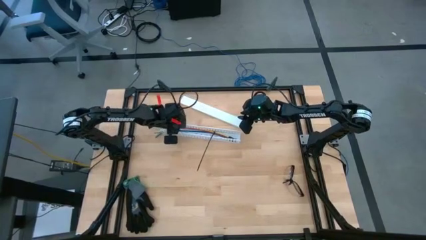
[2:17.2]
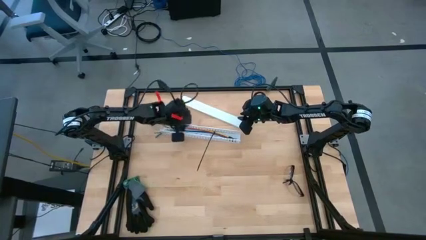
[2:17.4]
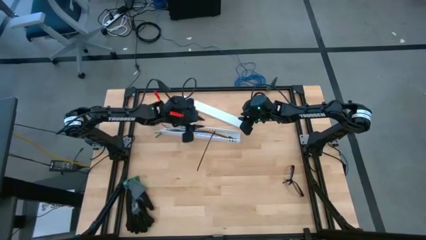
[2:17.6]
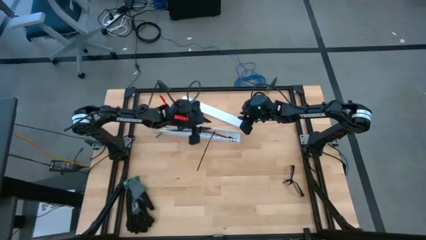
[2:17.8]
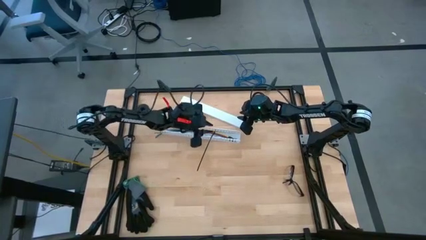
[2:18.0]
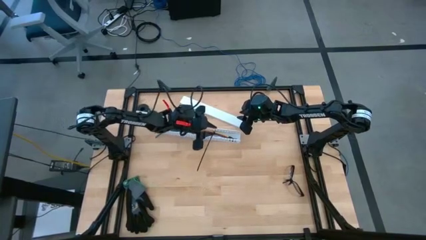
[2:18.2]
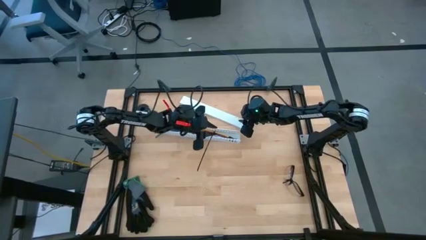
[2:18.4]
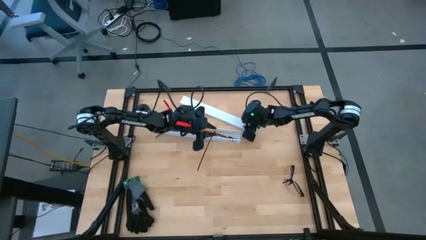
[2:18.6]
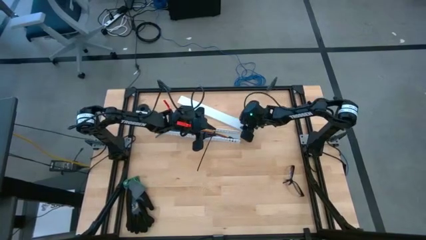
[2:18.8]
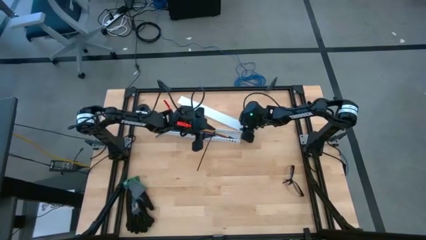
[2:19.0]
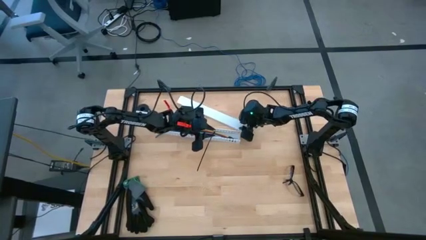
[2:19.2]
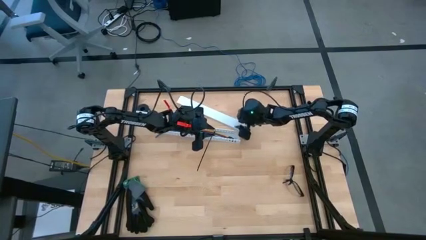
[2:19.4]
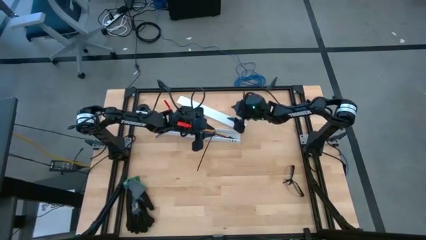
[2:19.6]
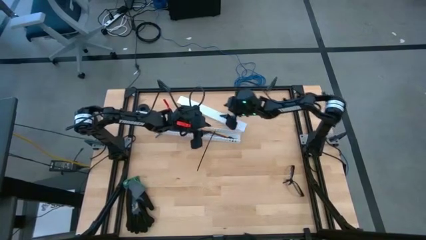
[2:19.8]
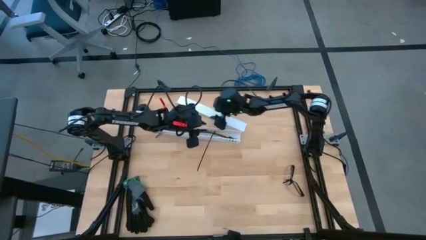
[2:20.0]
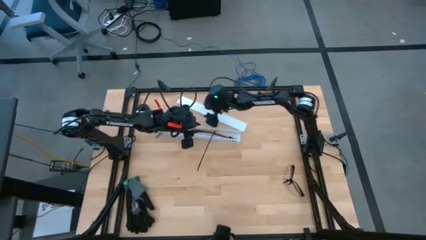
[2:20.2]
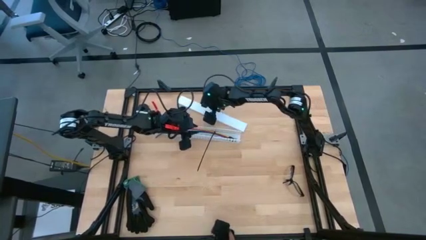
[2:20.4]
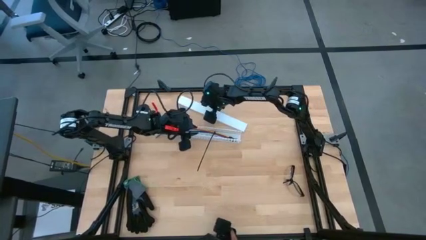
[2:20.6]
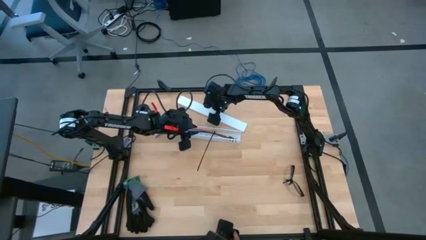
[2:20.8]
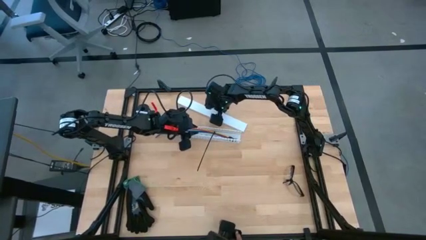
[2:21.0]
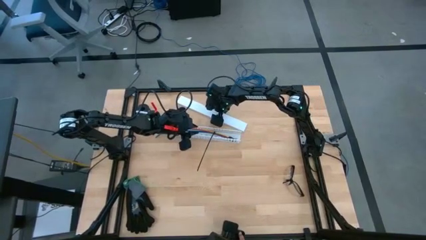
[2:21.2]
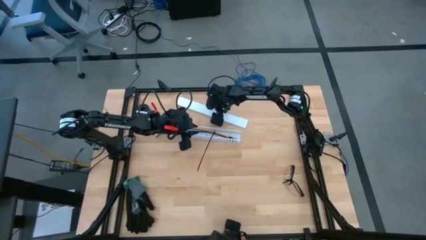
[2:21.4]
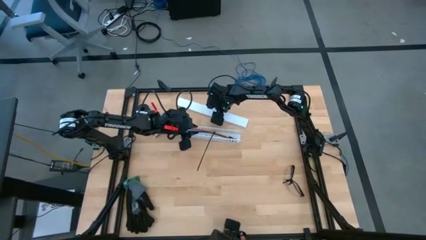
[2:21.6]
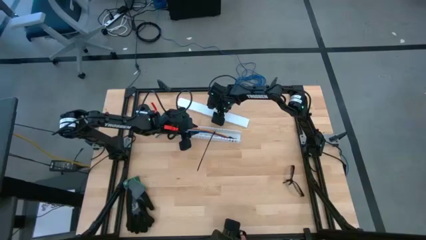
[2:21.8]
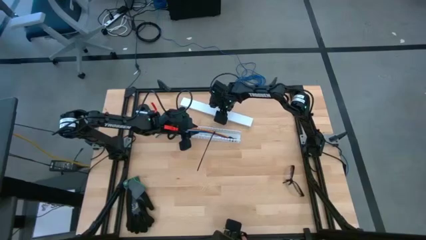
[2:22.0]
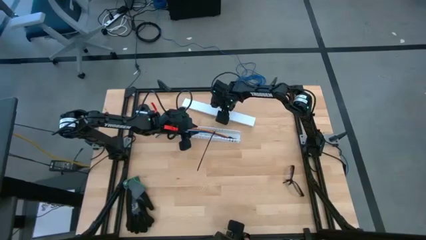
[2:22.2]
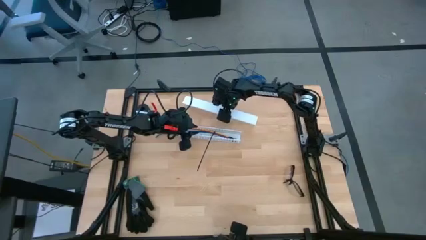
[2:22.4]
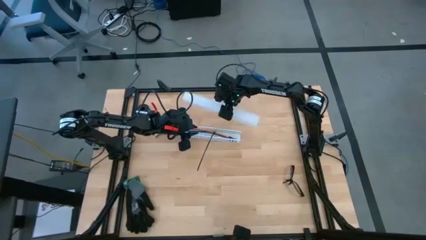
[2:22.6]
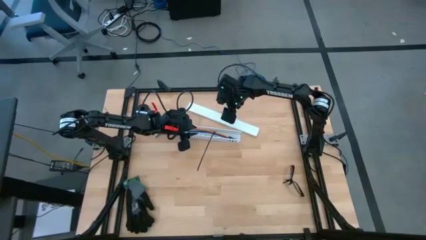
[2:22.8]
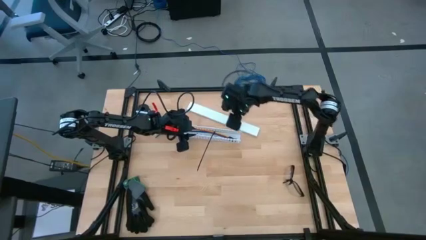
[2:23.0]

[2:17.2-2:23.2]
Task: Ziptie cables
Close the white cable duct

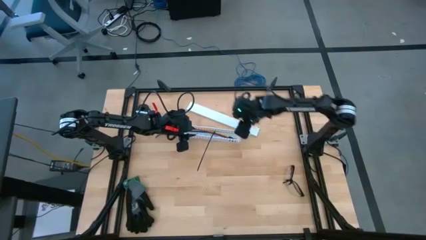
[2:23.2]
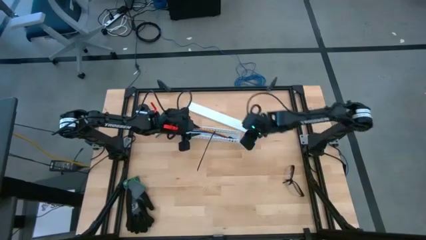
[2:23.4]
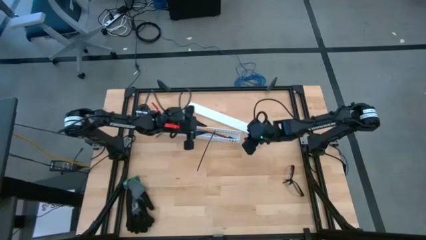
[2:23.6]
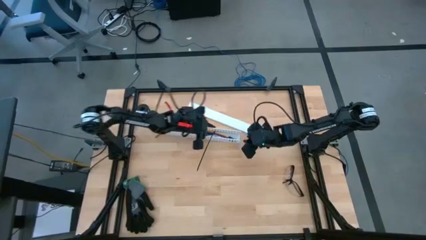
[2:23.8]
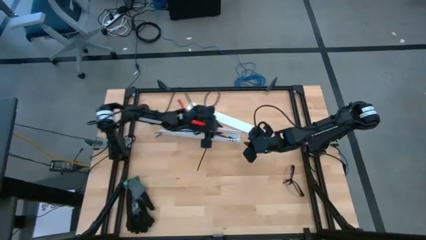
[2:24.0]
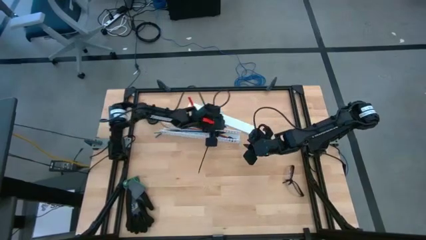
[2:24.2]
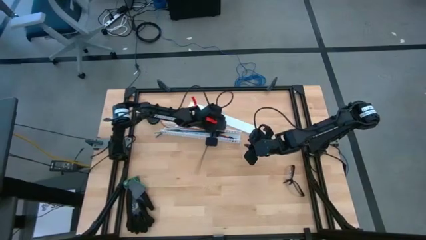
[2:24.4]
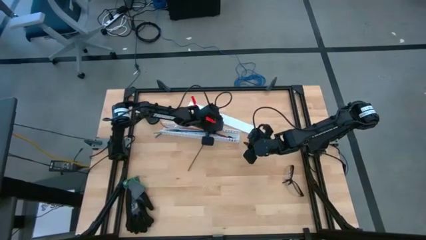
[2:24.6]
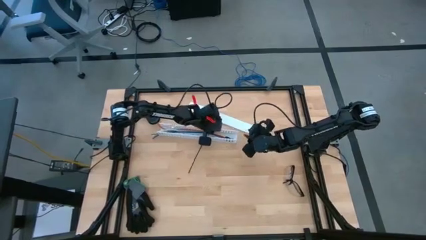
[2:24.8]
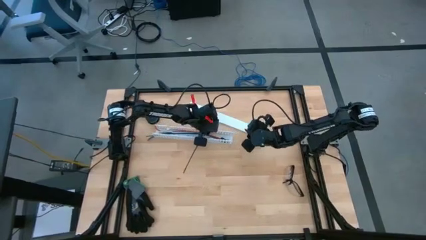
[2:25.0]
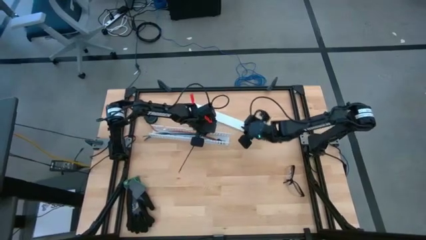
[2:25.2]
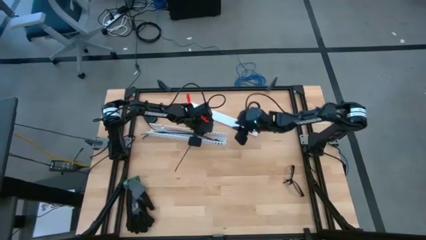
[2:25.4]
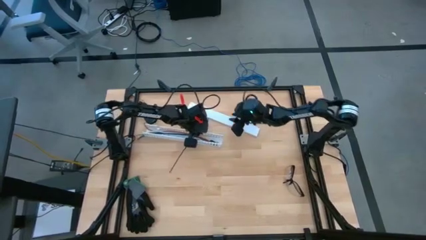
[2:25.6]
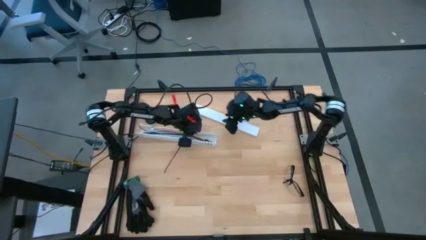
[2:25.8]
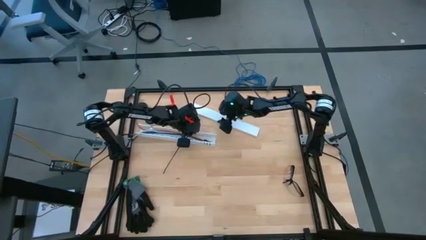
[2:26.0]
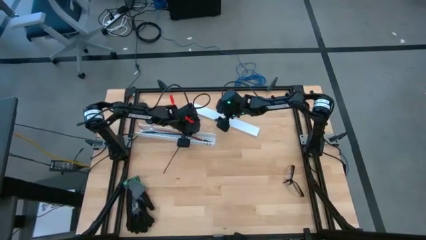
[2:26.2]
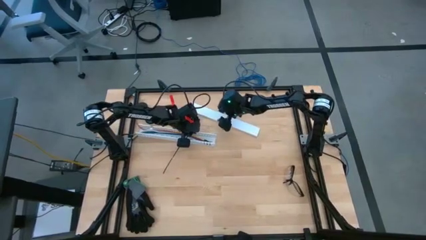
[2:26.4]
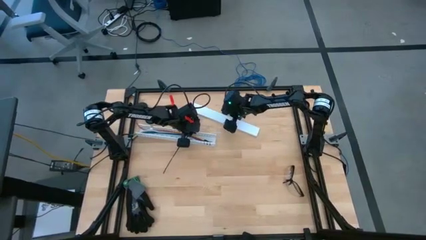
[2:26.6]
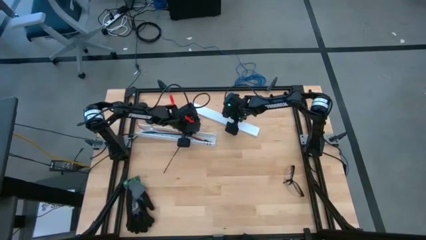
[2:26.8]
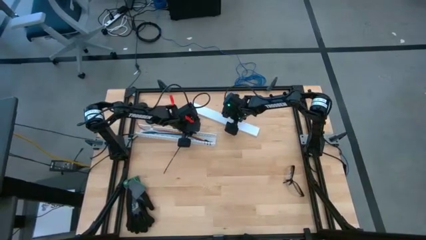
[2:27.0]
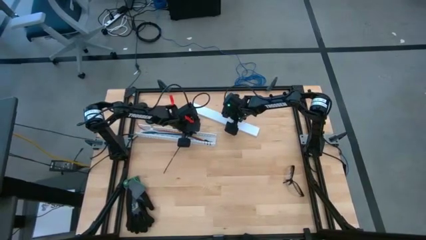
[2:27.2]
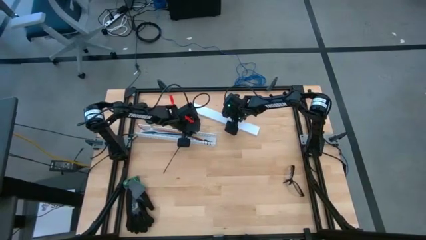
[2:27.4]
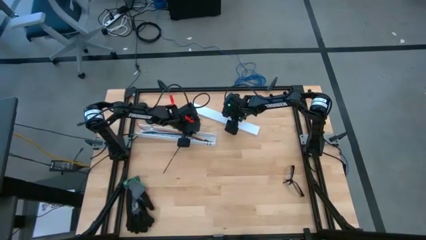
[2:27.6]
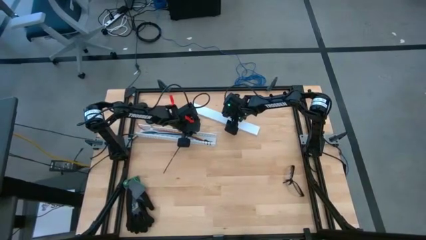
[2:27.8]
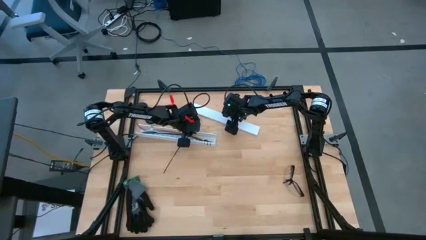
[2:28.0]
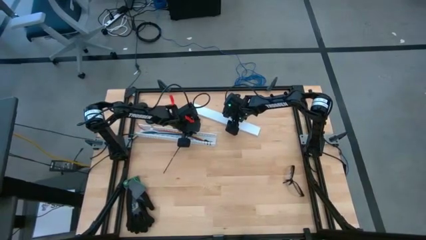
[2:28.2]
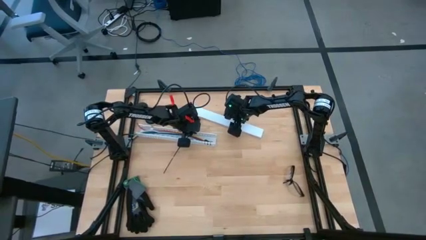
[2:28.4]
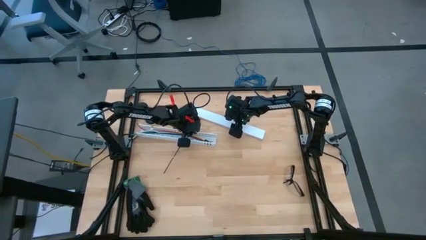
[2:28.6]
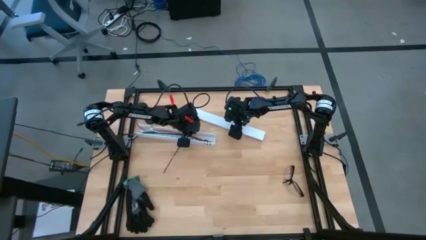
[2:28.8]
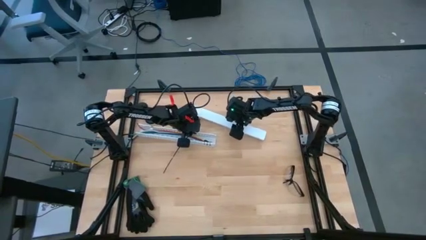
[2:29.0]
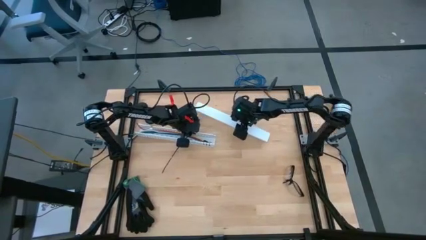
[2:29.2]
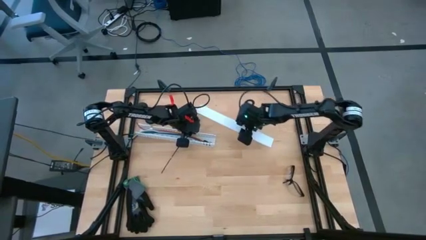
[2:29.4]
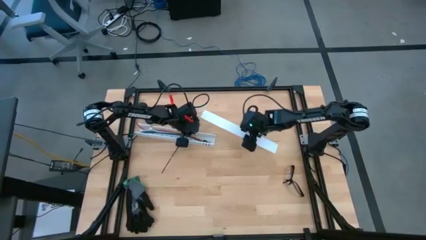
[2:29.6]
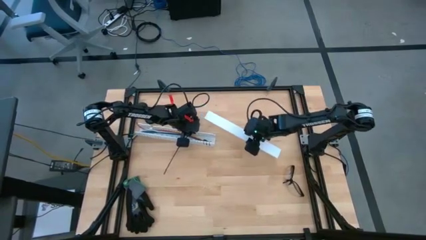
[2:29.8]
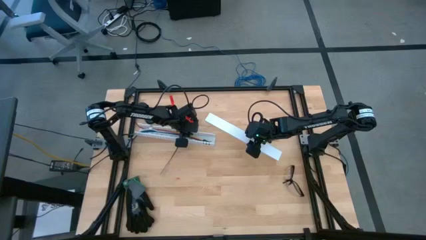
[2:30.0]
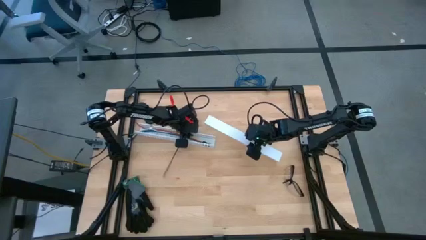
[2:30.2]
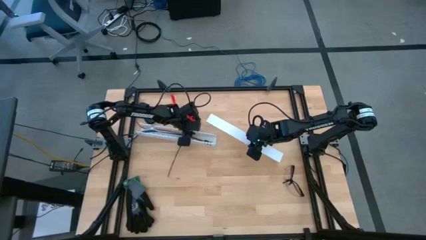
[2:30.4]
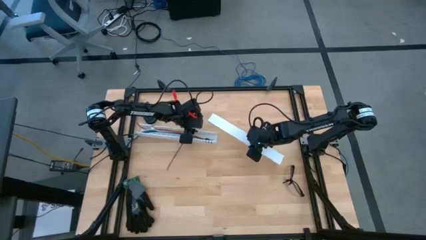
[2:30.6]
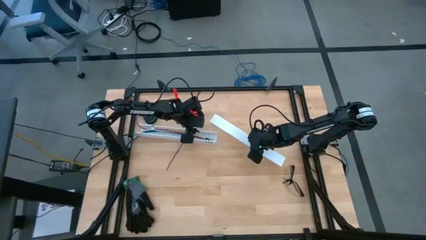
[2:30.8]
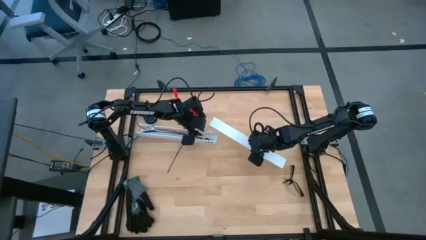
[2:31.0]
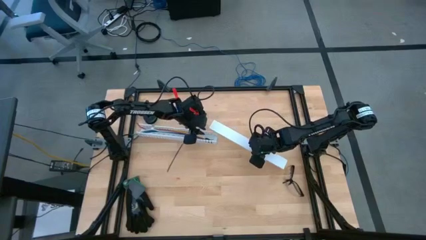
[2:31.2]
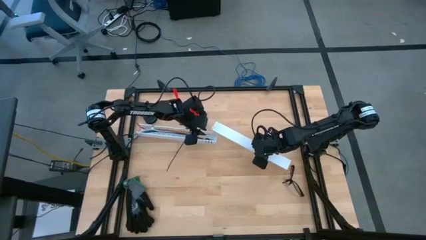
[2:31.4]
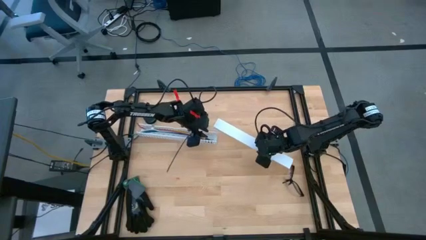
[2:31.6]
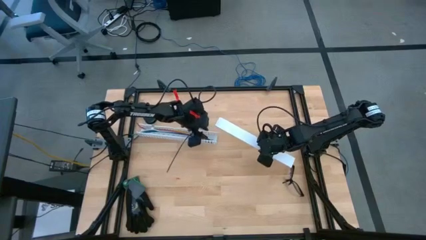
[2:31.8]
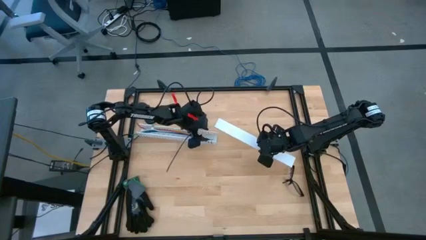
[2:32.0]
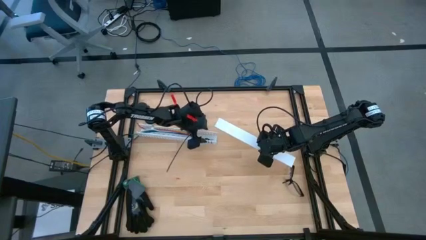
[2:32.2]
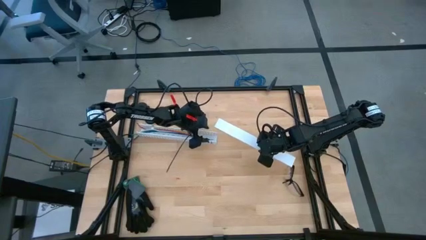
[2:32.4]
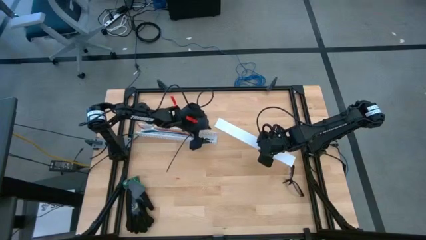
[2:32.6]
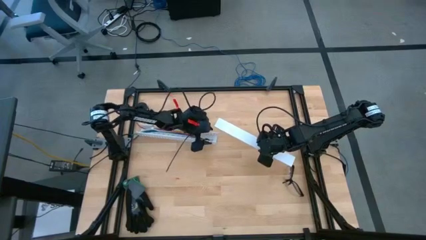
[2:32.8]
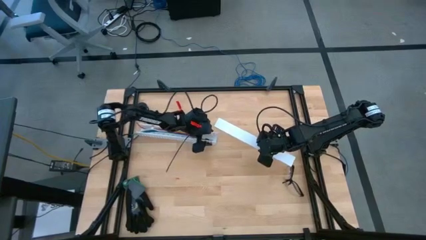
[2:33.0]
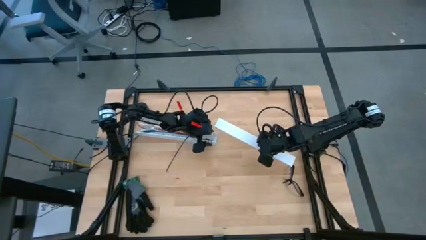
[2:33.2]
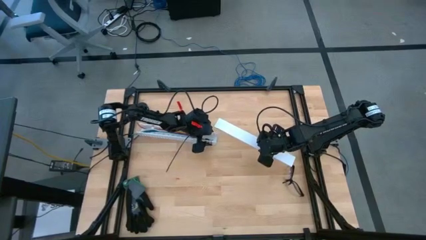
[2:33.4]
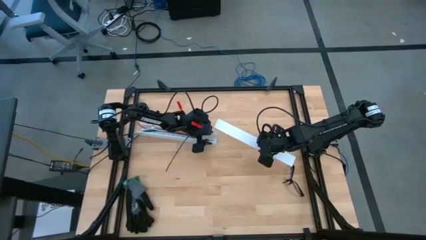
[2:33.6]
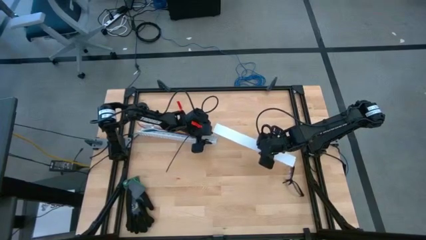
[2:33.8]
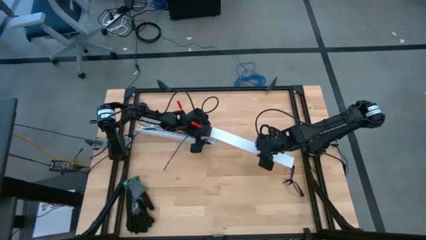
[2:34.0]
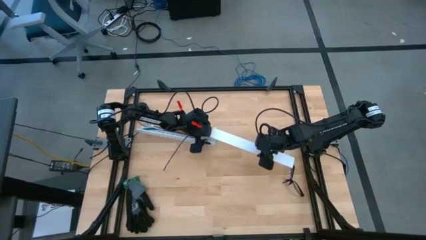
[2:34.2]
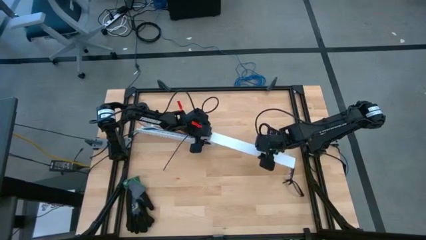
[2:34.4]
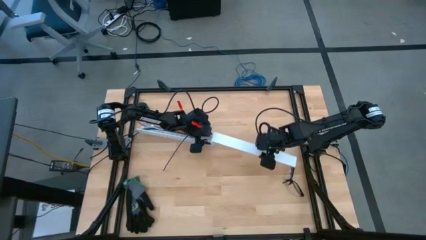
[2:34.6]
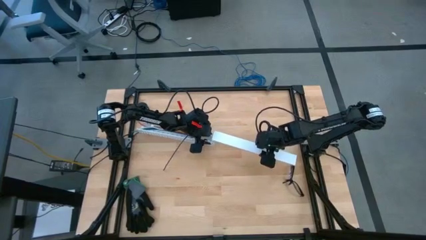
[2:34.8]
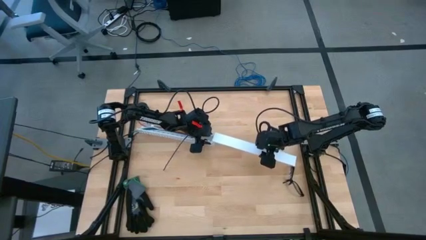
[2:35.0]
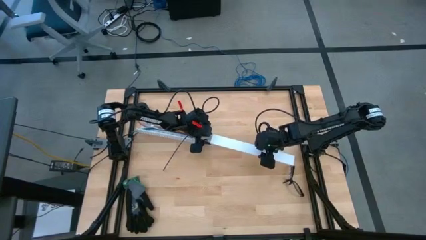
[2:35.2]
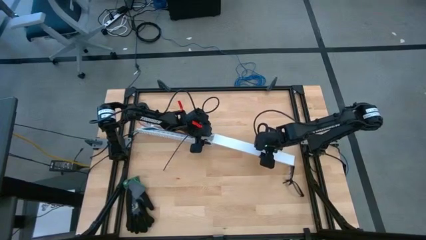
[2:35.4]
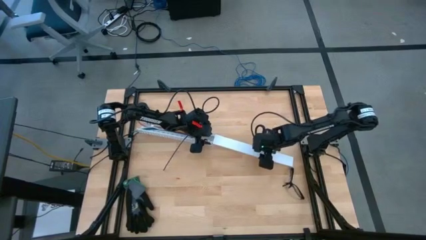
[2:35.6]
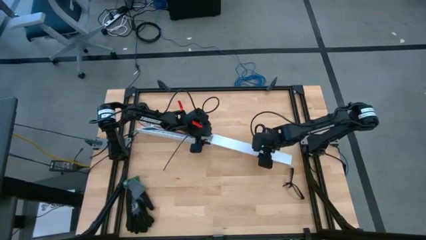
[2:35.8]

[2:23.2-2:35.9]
Close the white cable duct
